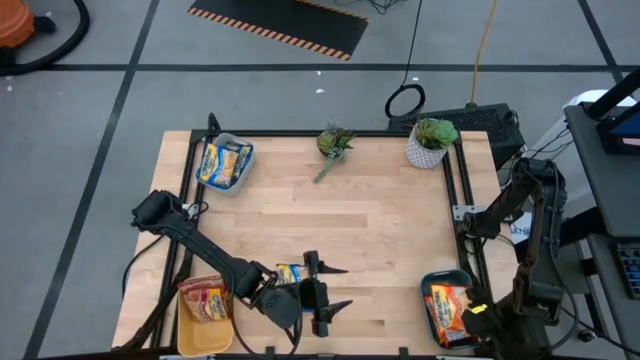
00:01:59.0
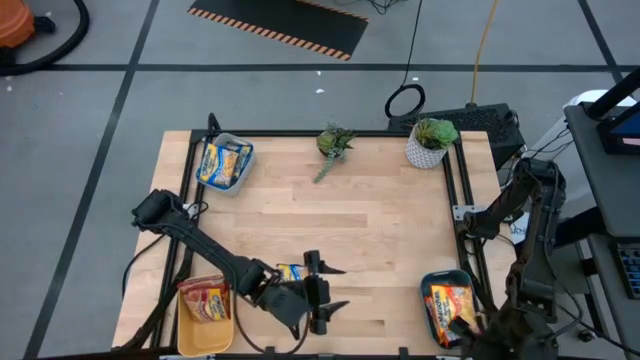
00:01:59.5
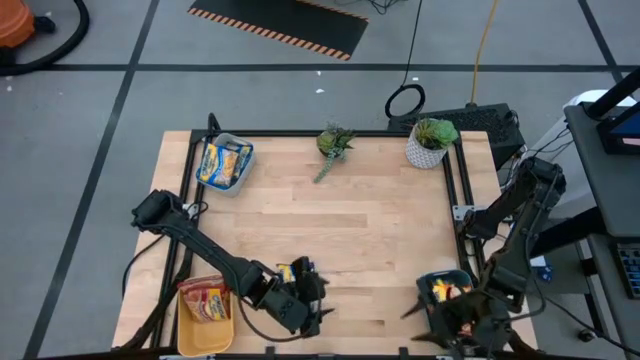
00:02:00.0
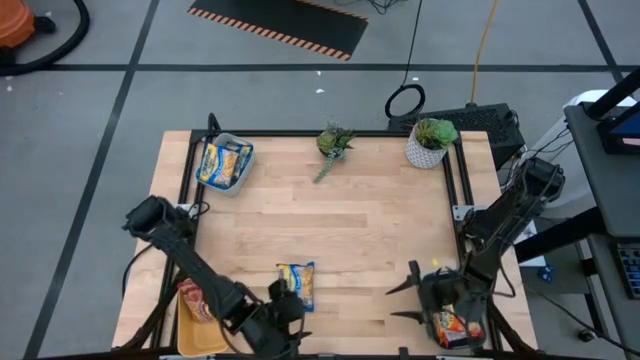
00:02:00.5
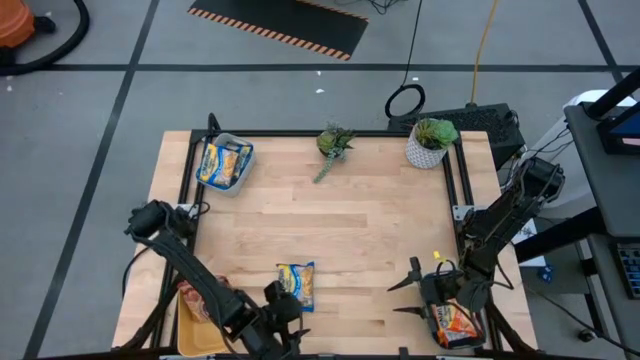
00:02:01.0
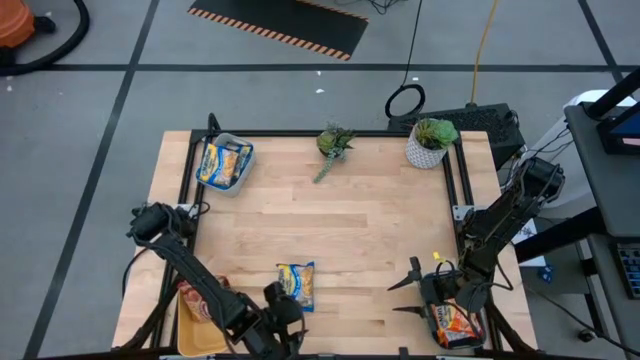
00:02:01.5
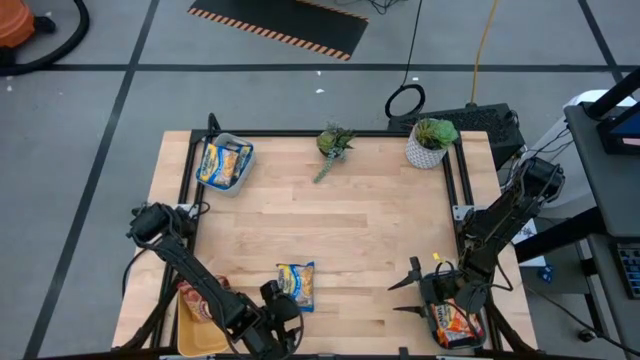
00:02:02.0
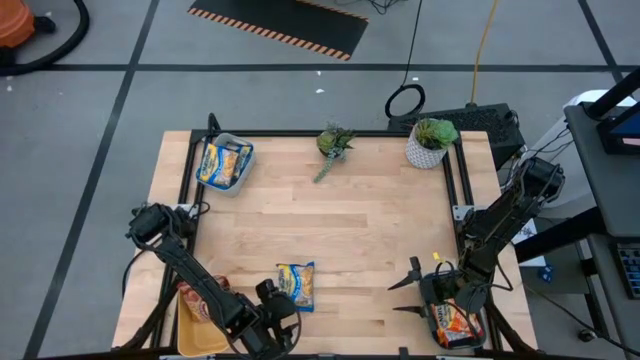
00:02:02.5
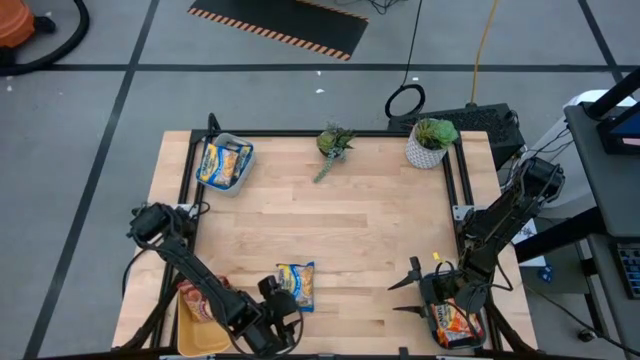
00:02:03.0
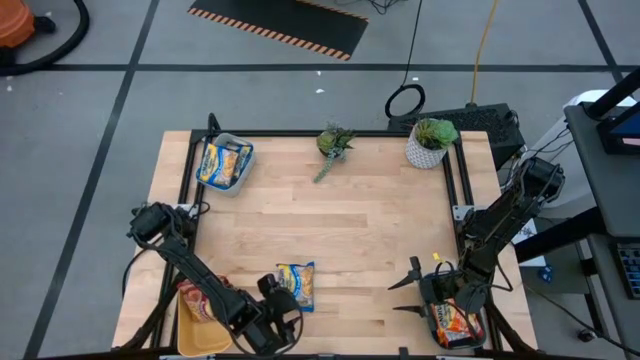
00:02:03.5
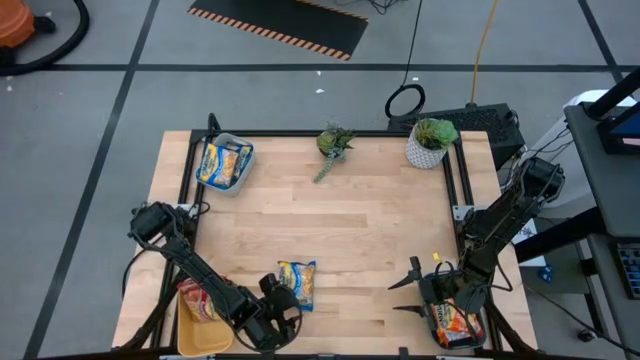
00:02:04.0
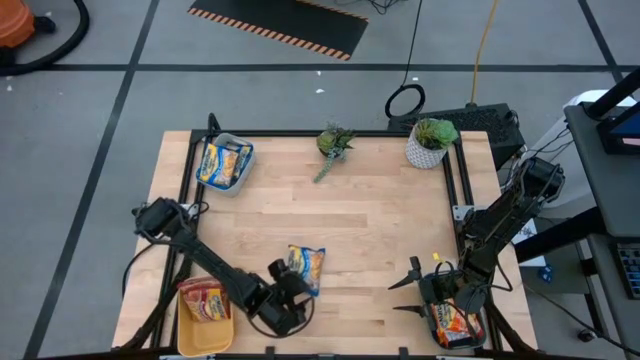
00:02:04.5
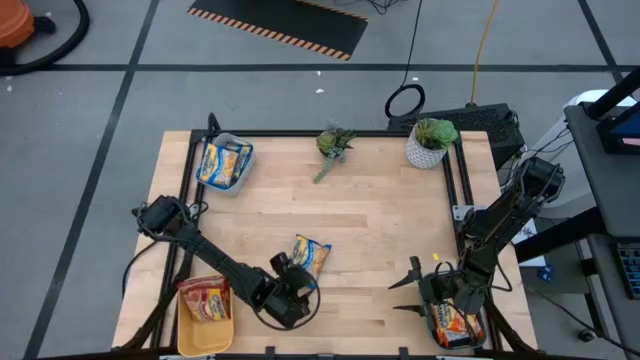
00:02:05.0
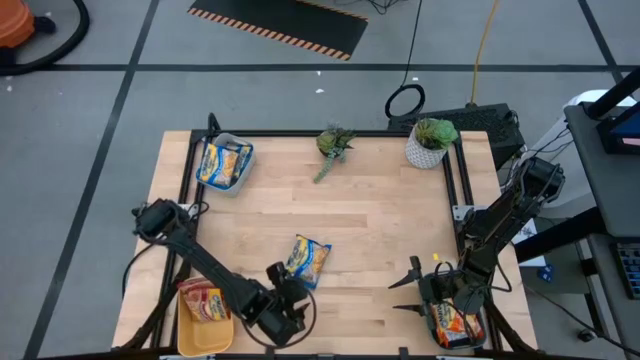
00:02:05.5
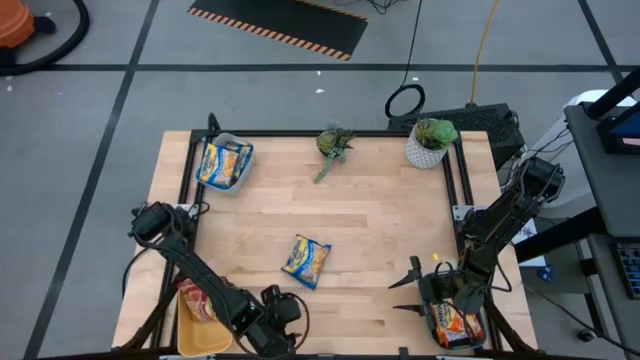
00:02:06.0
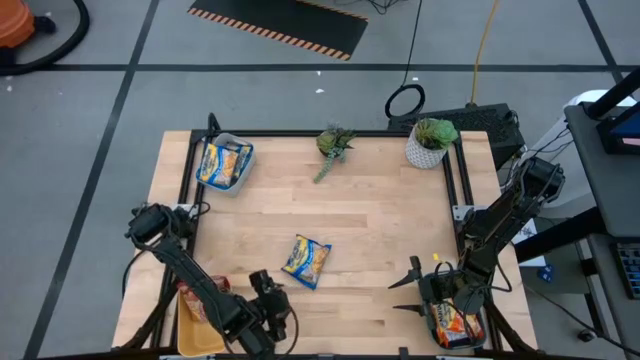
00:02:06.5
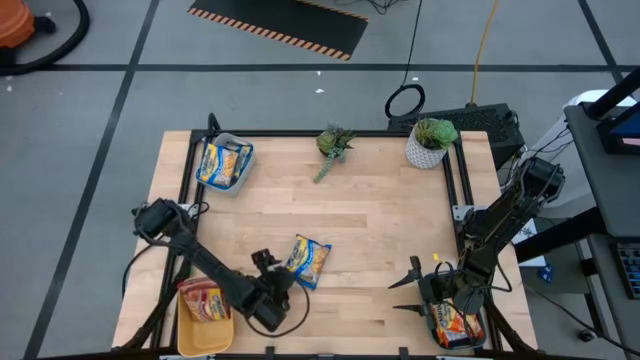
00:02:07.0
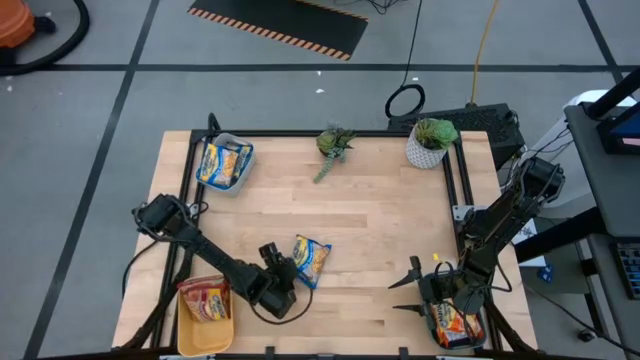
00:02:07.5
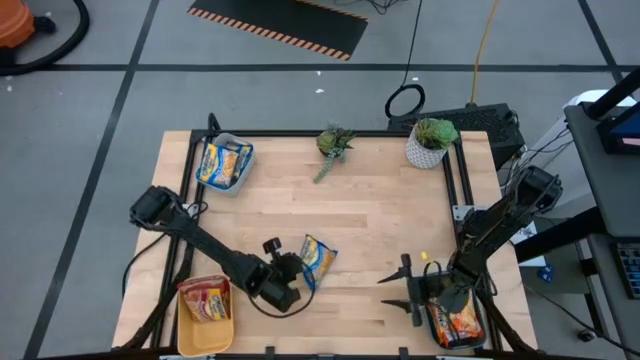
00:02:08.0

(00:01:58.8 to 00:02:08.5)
Task: Sort Maruchan noodles
Put the blue noodle pack into the gray bin

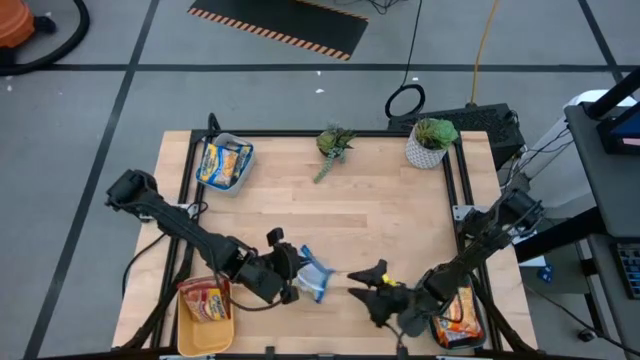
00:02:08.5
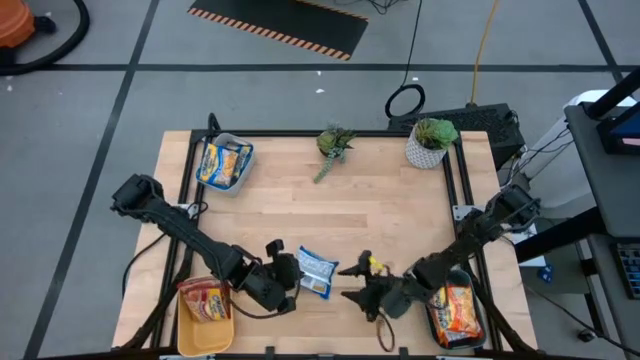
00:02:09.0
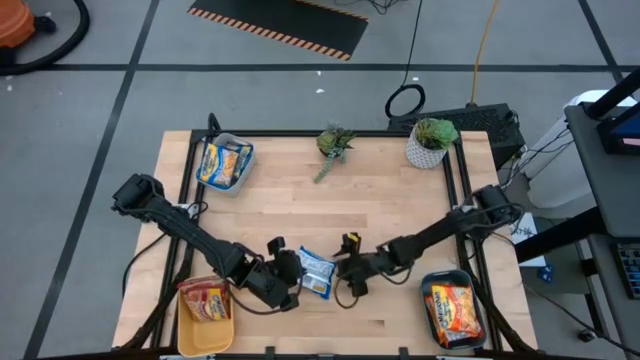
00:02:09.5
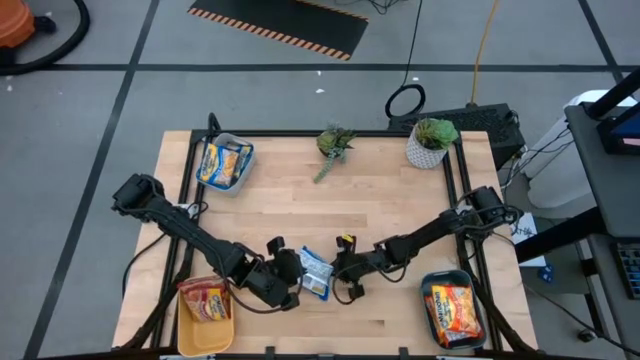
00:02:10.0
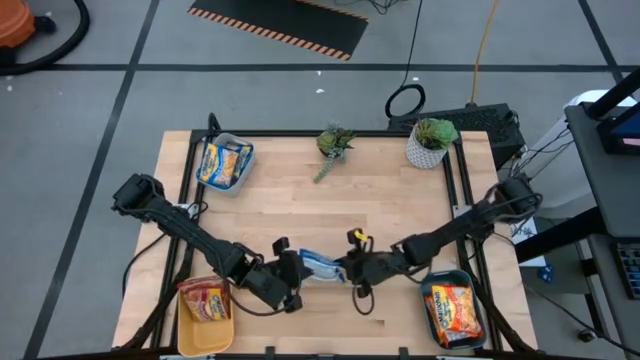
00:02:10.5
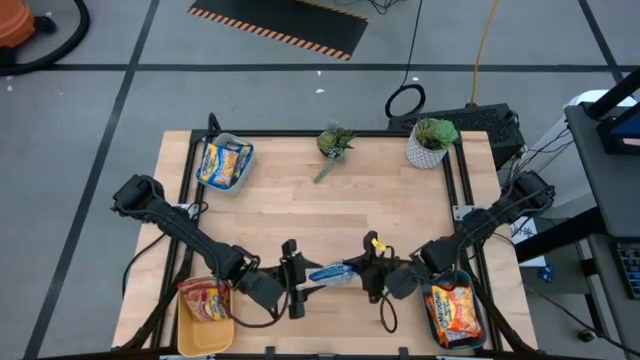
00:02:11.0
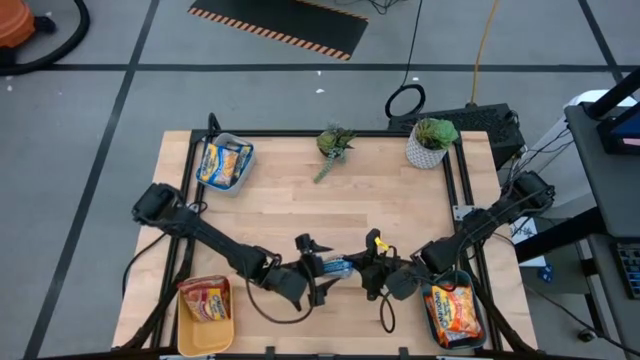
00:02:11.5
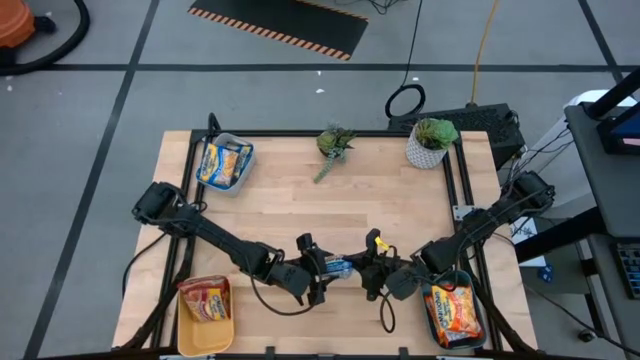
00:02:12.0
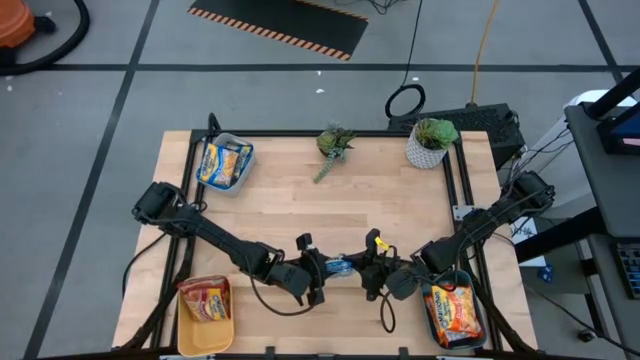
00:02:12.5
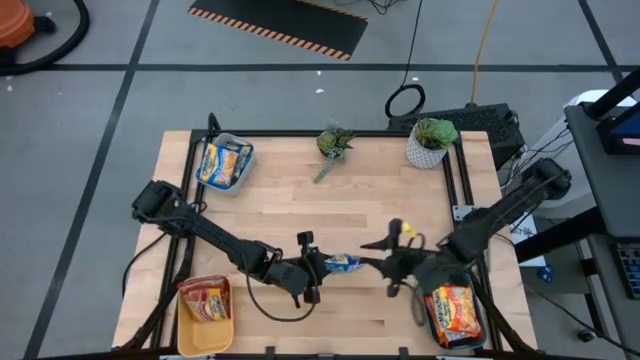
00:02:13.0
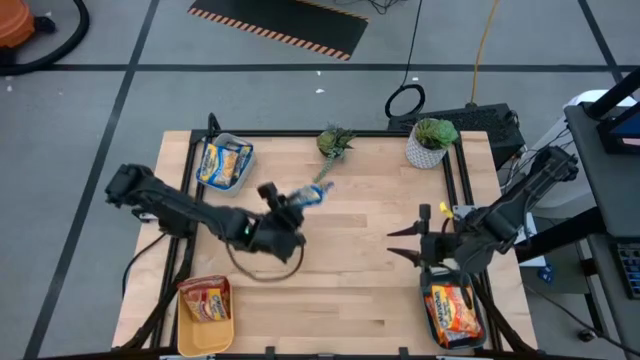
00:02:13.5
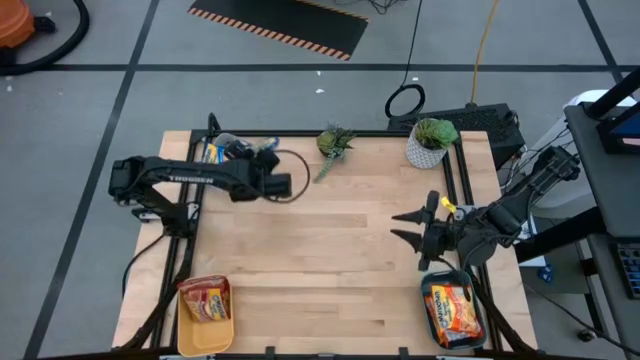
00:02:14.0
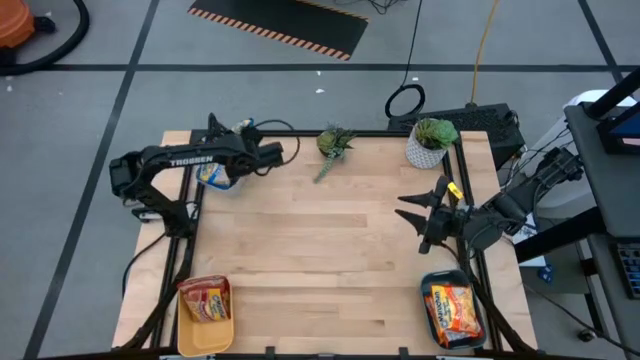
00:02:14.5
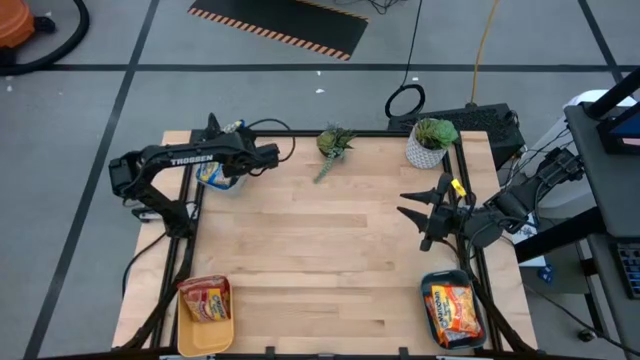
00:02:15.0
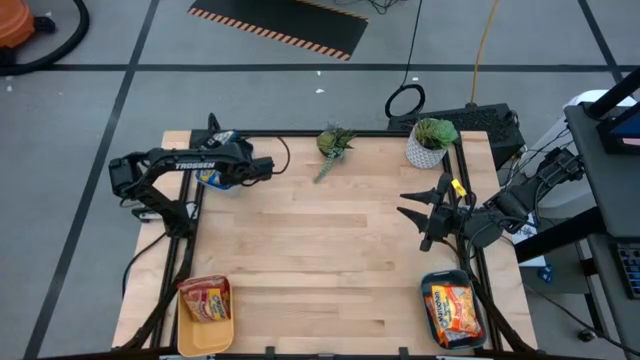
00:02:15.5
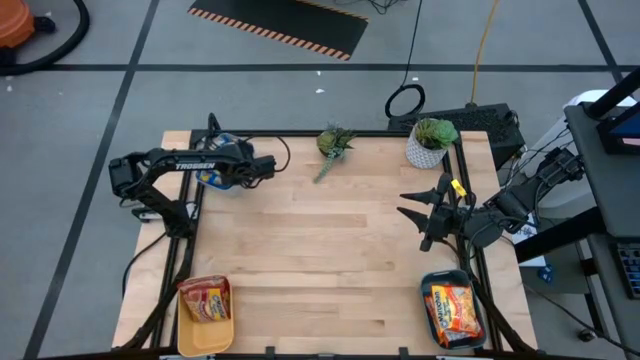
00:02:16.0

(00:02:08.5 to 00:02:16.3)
Put the blue noodle pack into the gray bin

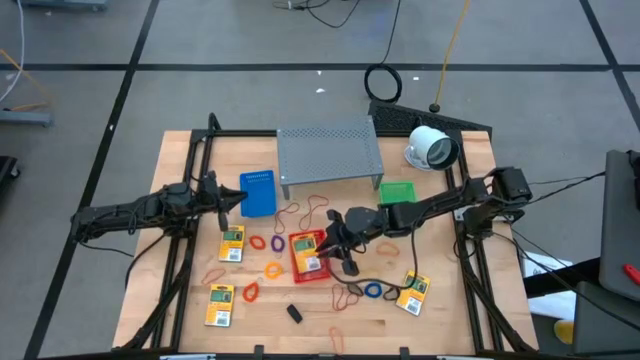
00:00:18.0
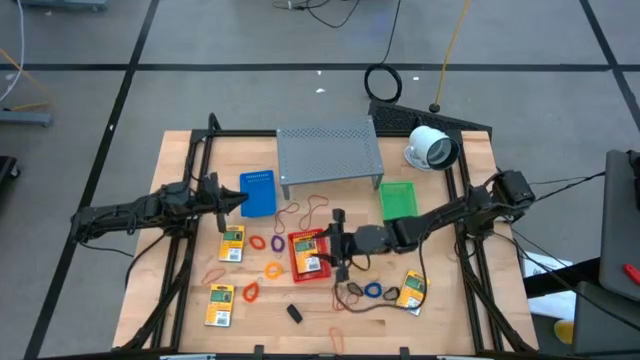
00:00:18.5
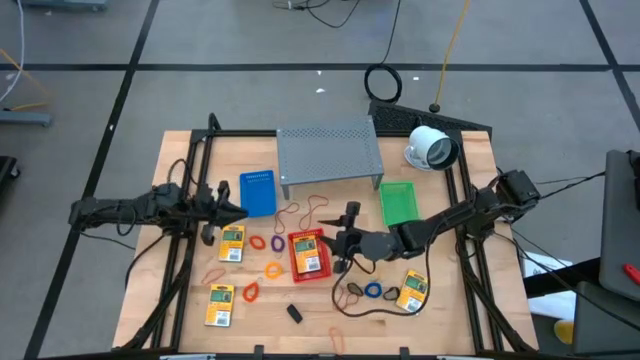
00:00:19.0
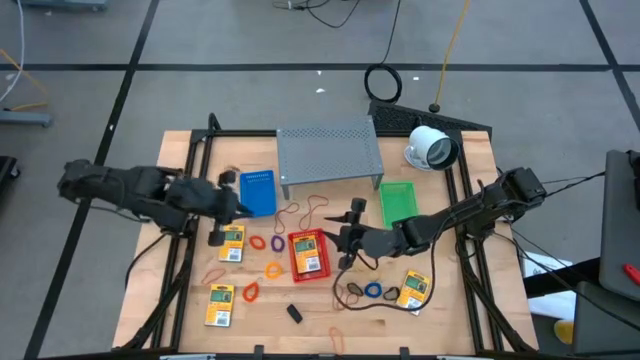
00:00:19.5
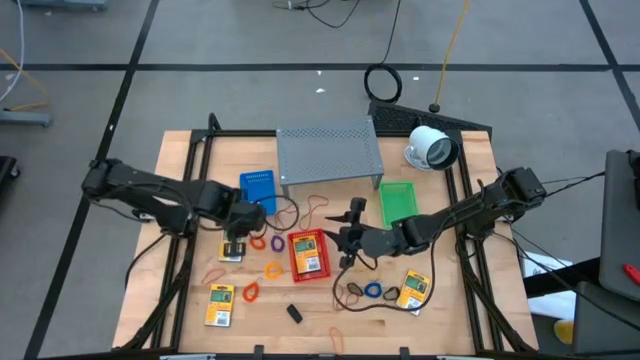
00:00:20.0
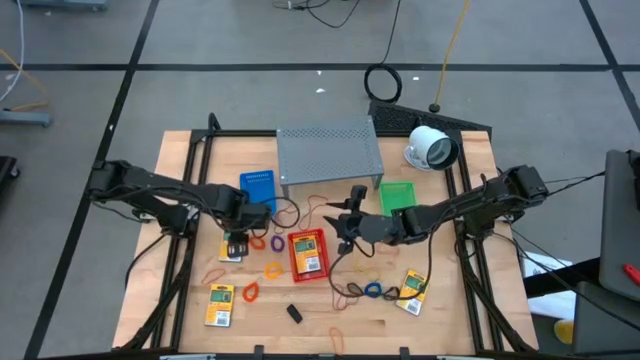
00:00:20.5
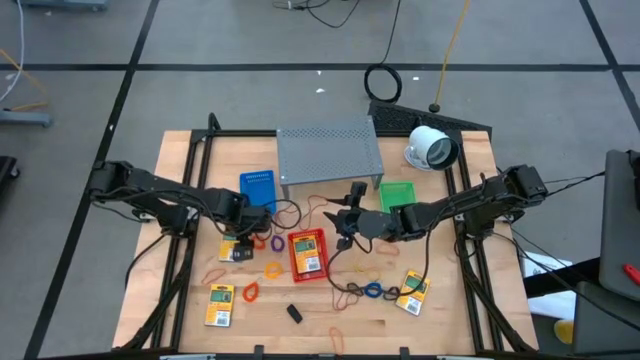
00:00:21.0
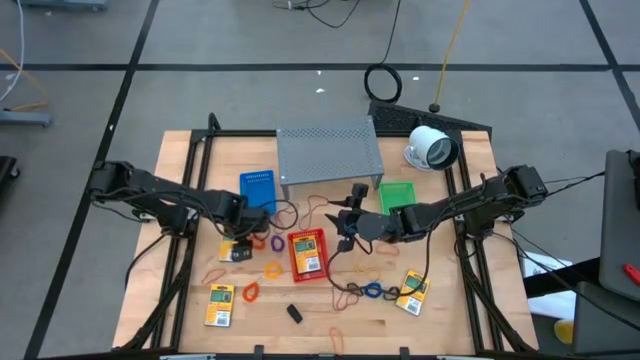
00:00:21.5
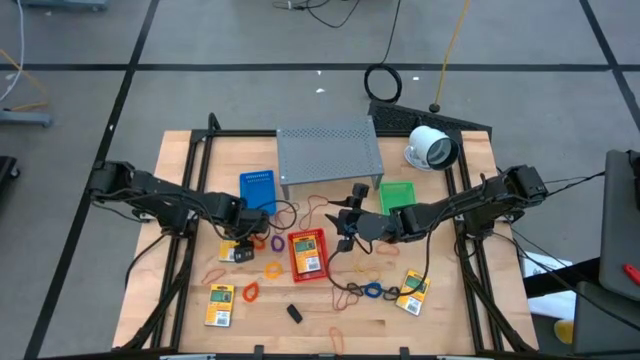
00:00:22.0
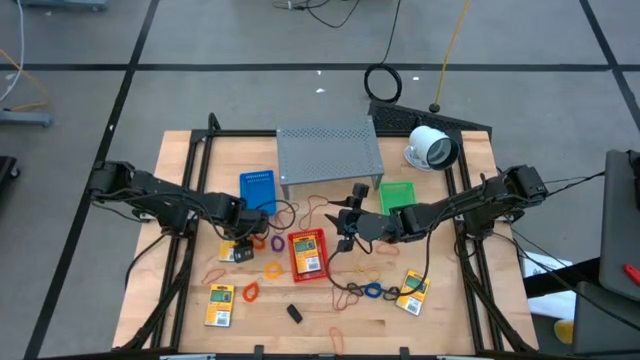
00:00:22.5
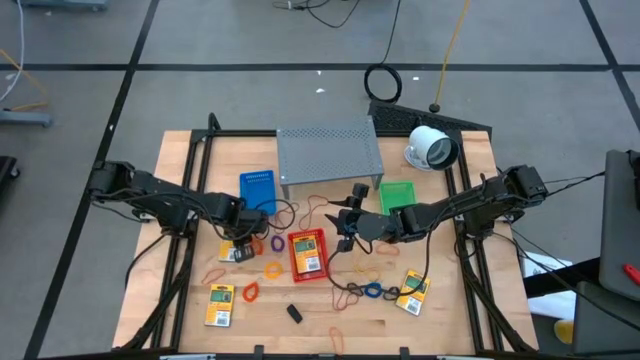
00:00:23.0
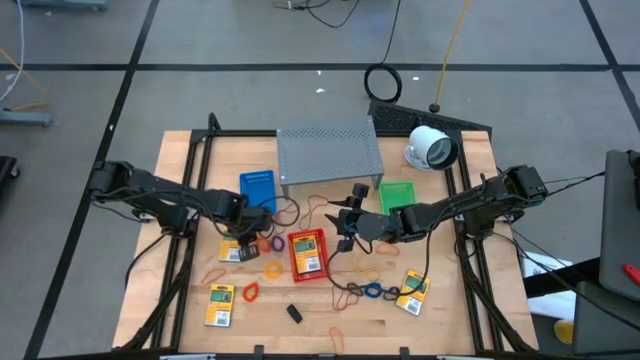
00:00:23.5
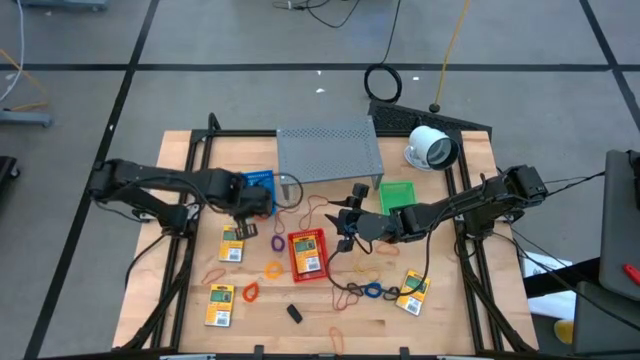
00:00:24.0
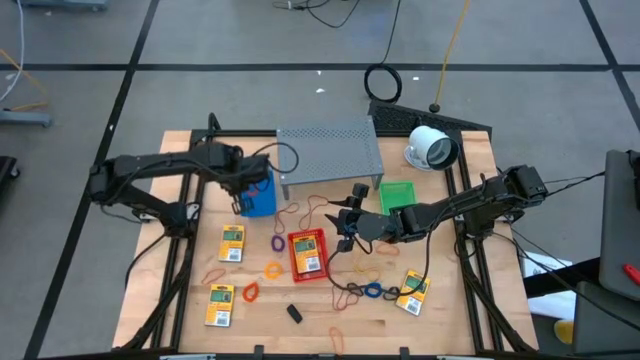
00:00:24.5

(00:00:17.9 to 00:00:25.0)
Task: Pick & Place Office Desk Supplies
Put the top orange spring keychain into the blue bin
